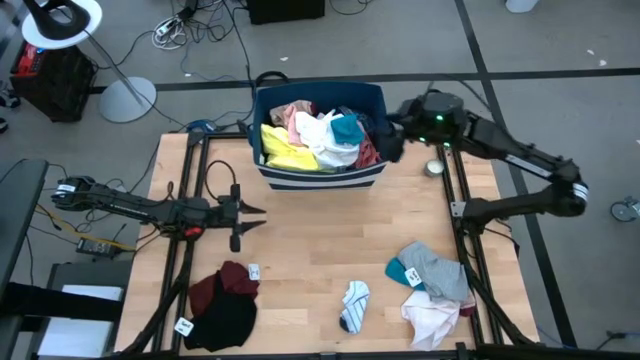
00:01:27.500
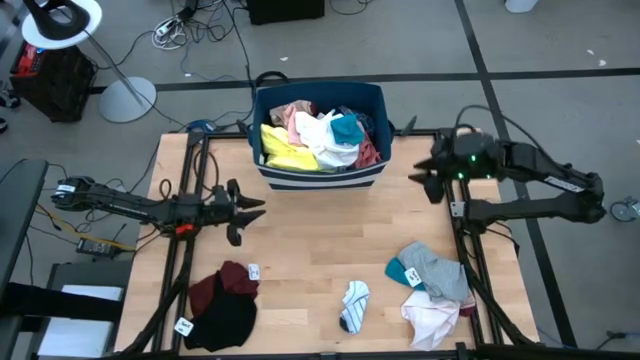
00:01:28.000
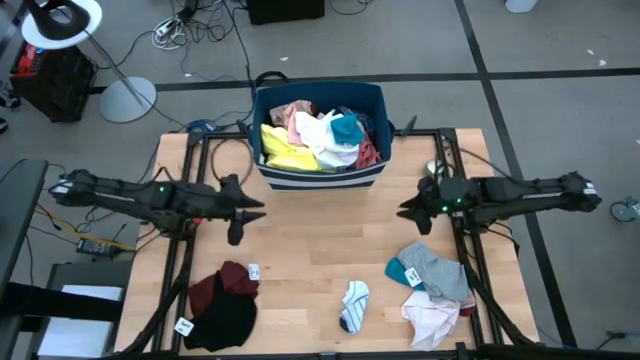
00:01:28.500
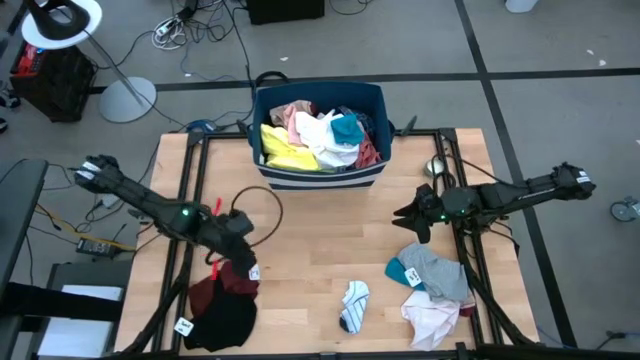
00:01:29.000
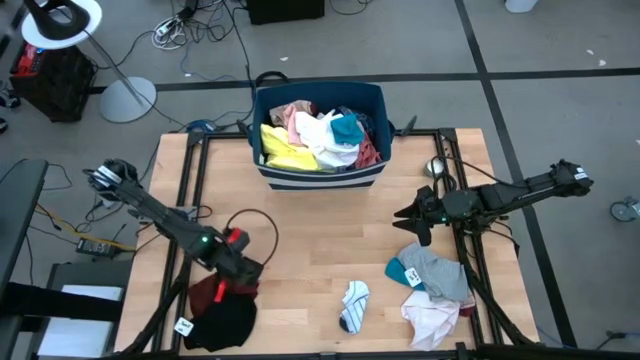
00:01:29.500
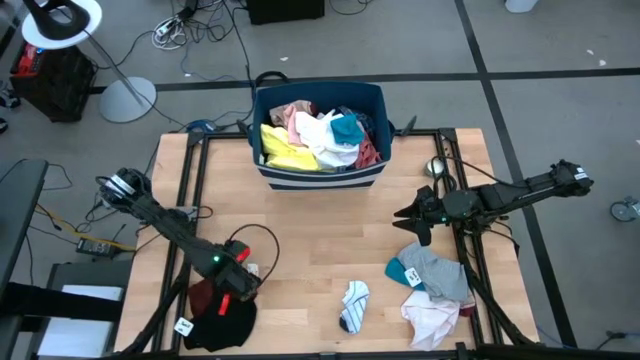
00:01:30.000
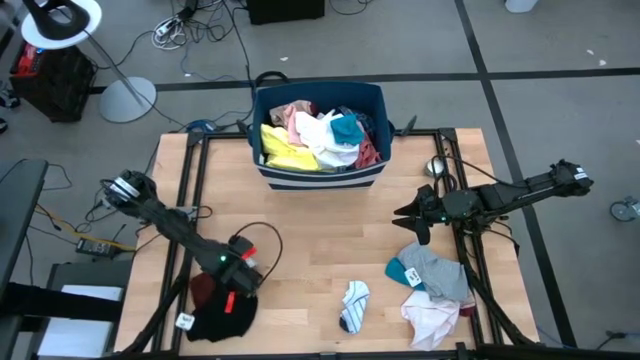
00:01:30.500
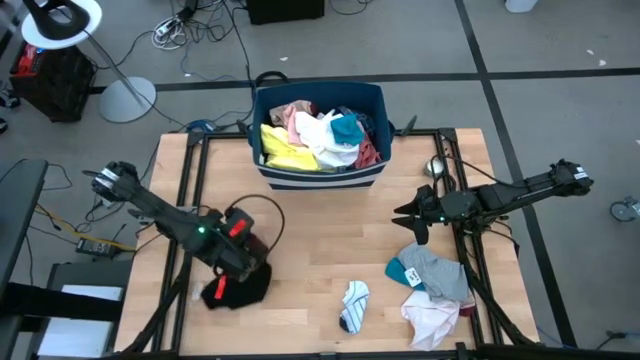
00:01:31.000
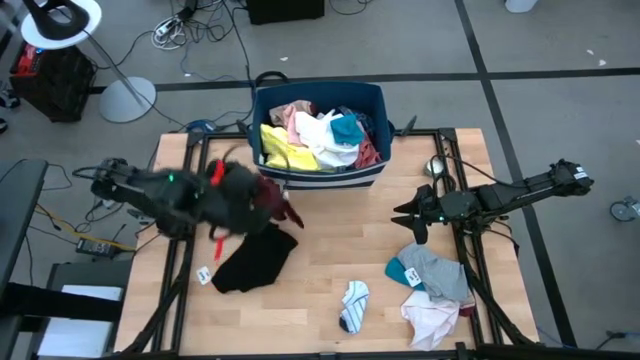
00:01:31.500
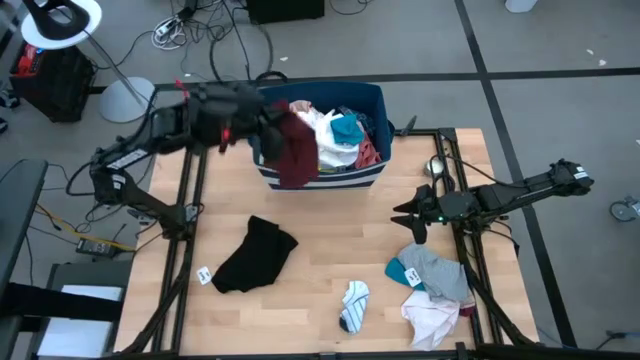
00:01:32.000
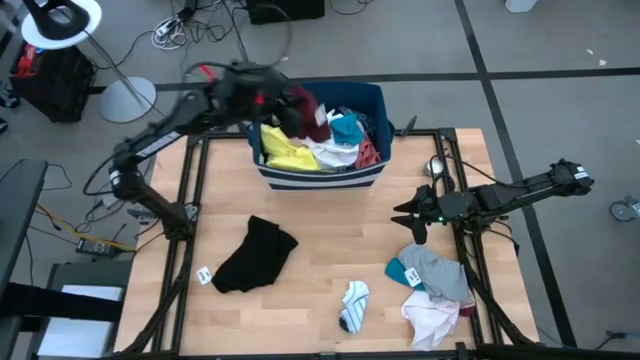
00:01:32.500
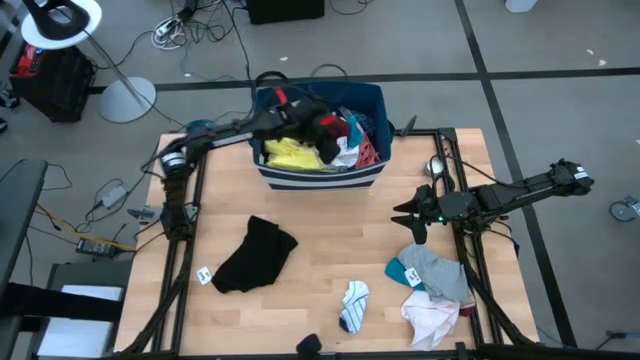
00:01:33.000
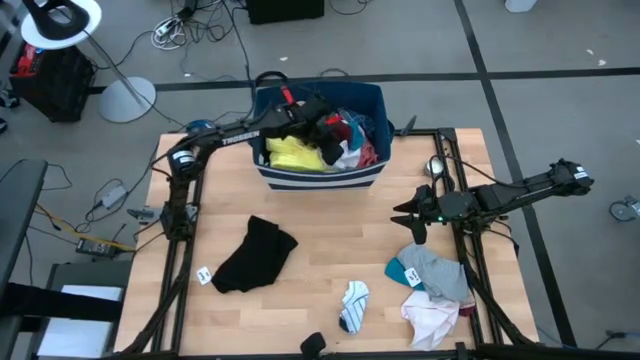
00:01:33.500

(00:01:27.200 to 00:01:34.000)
Task: Sort clothes
Put the red underwear into the blue laundry bin

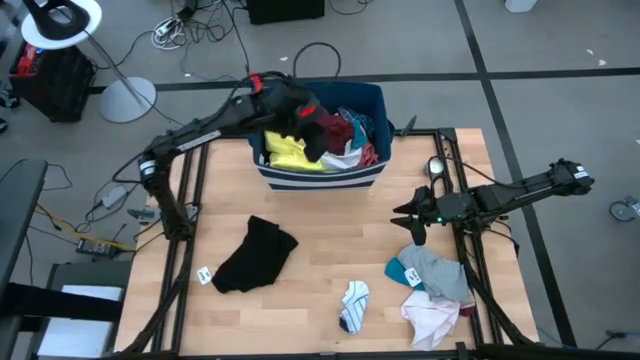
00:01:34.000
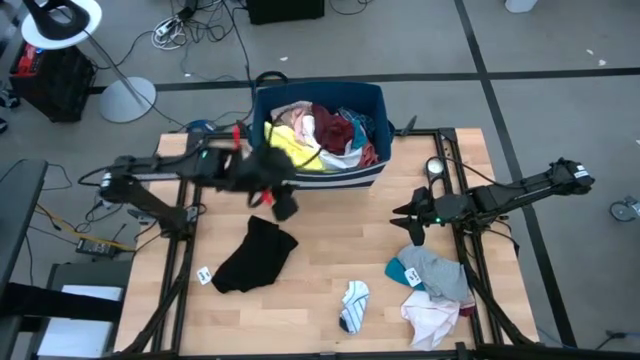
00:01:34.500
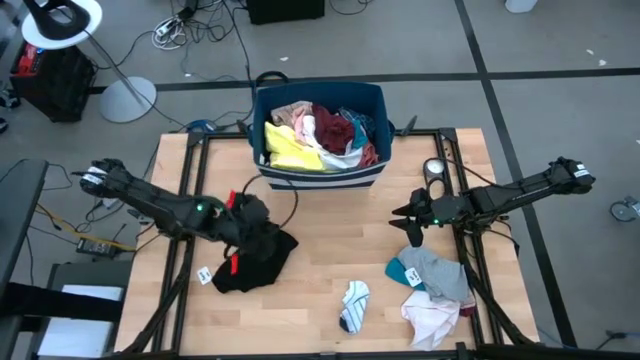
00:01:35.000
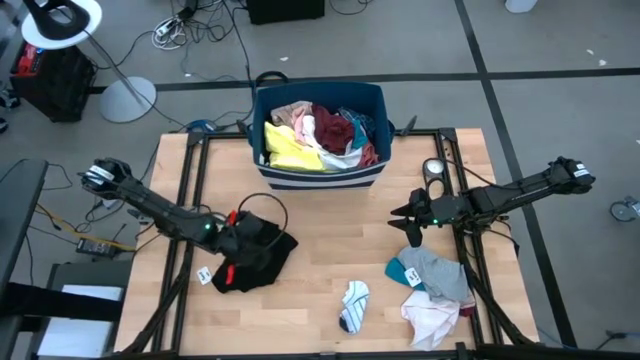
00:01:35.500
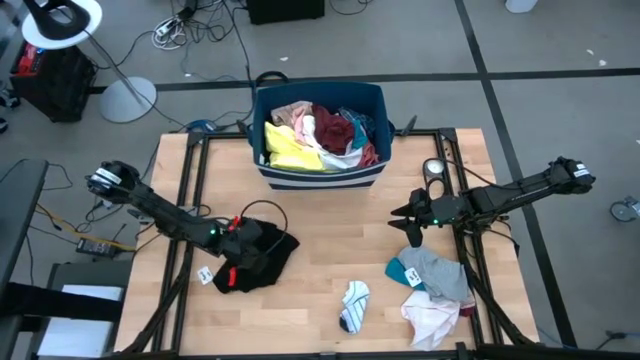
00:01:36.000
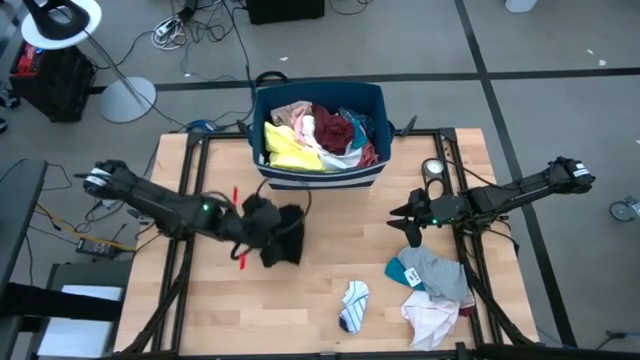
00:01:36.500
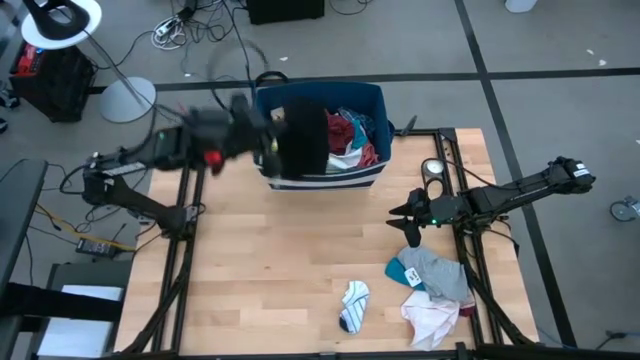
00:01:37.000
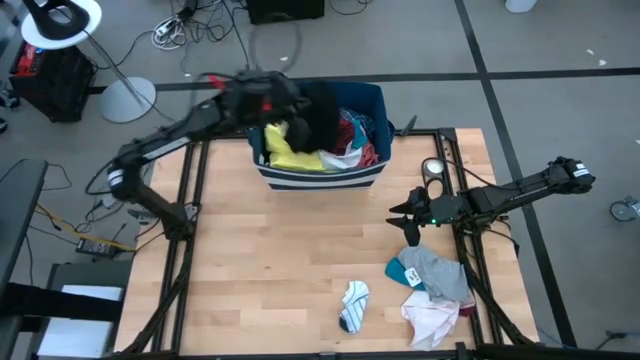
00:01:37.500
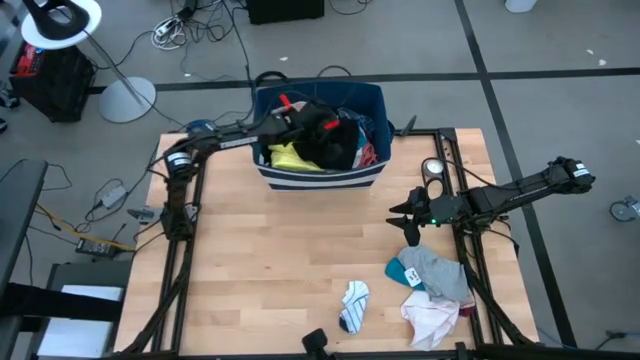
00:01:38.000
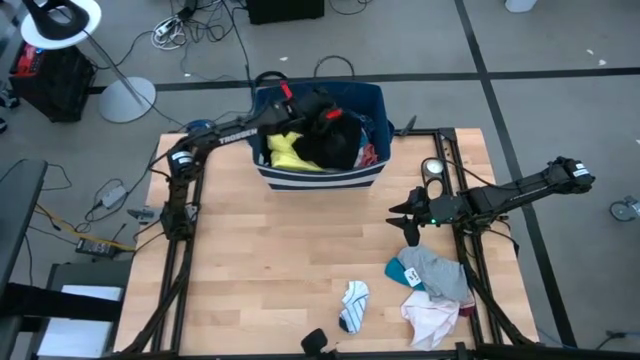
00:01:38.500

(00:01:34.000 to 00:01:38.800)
Put the black underwear into the blue laundry bin

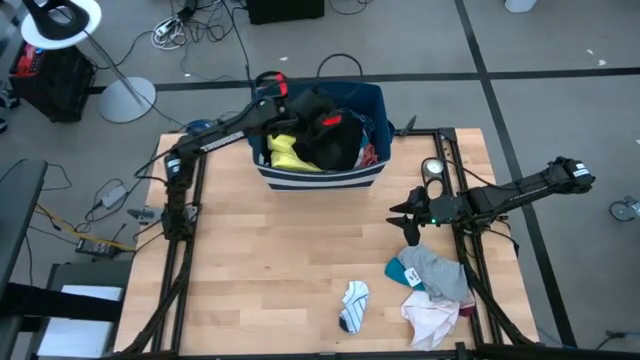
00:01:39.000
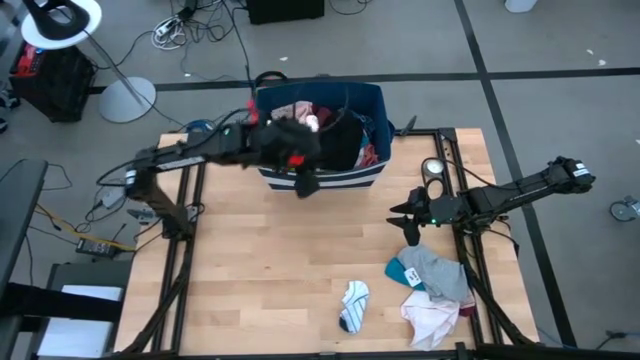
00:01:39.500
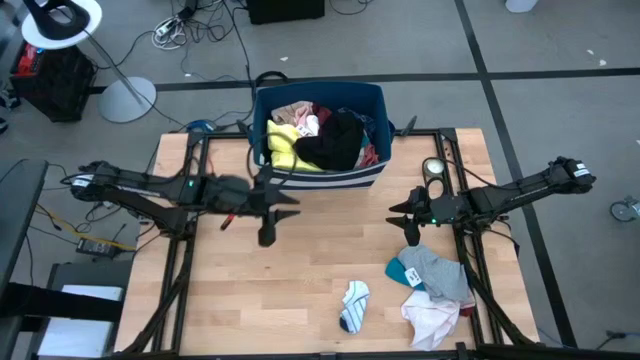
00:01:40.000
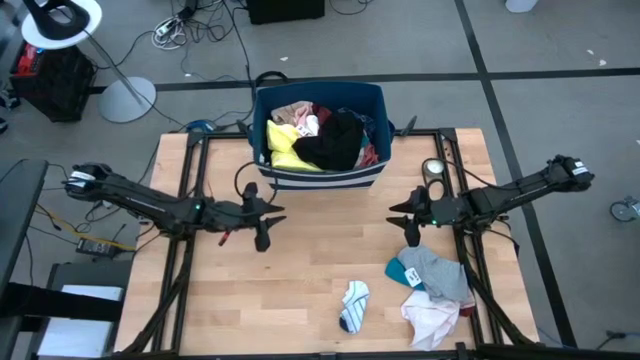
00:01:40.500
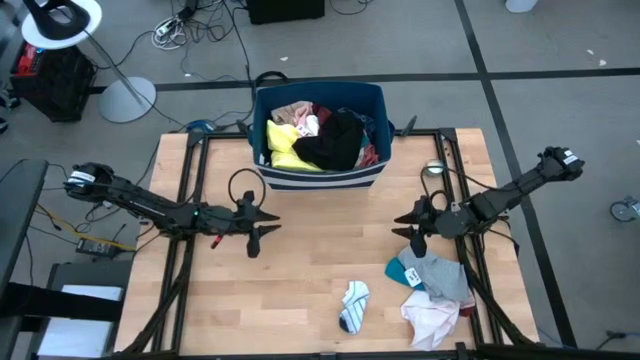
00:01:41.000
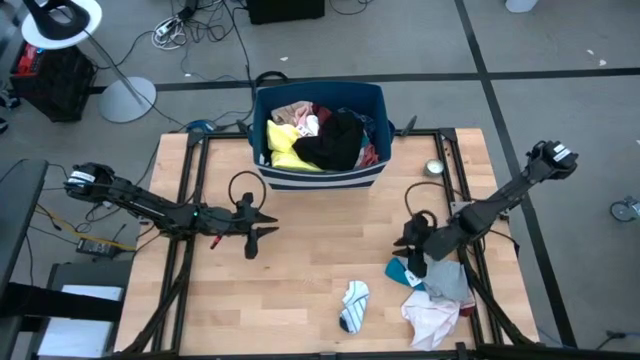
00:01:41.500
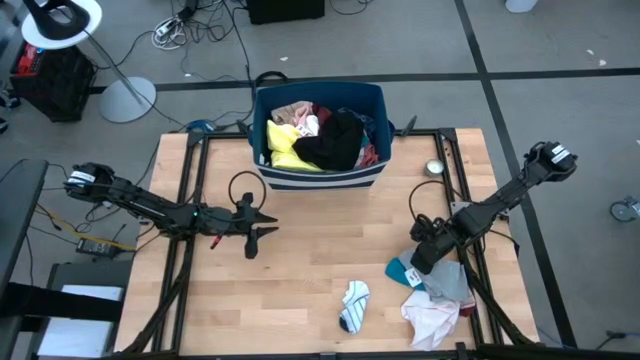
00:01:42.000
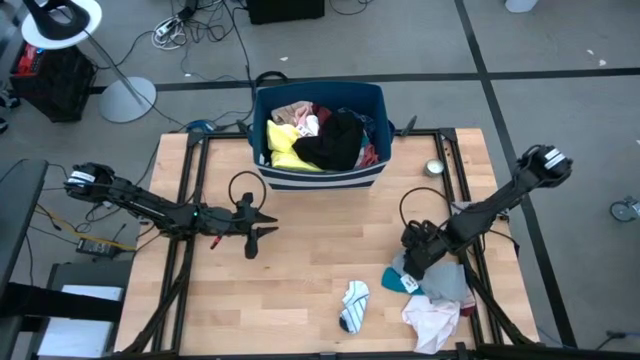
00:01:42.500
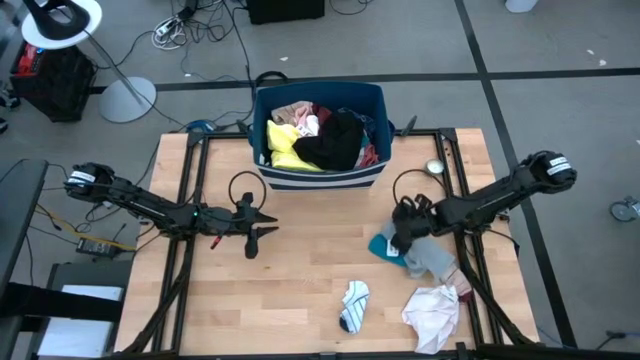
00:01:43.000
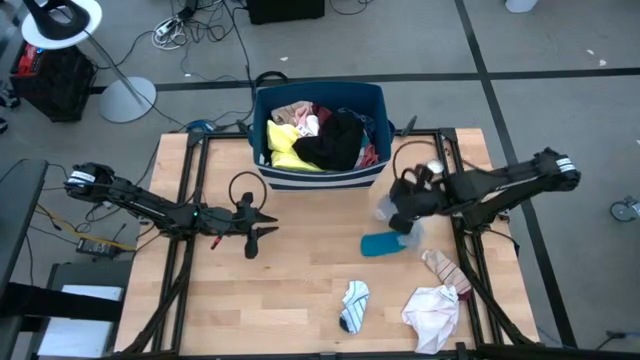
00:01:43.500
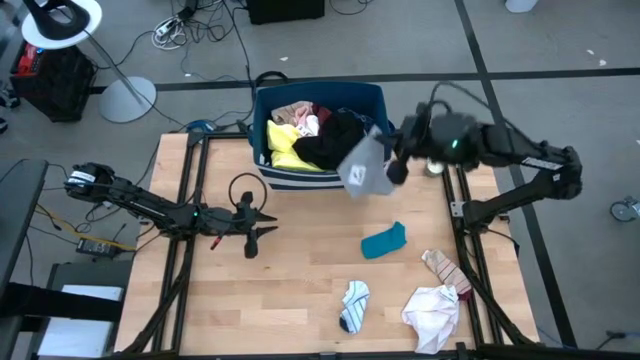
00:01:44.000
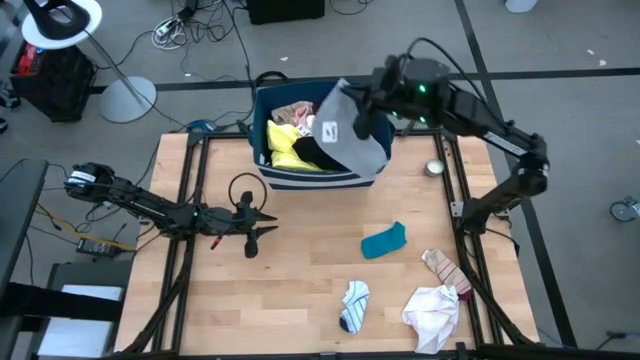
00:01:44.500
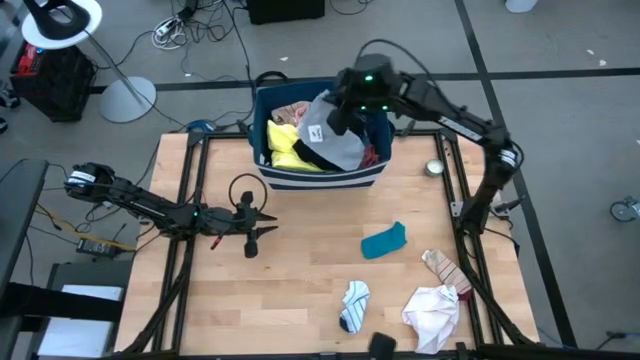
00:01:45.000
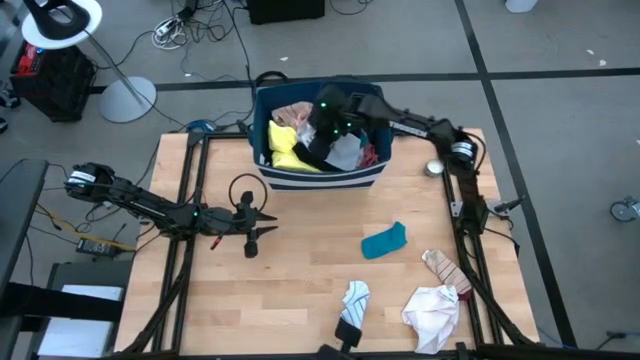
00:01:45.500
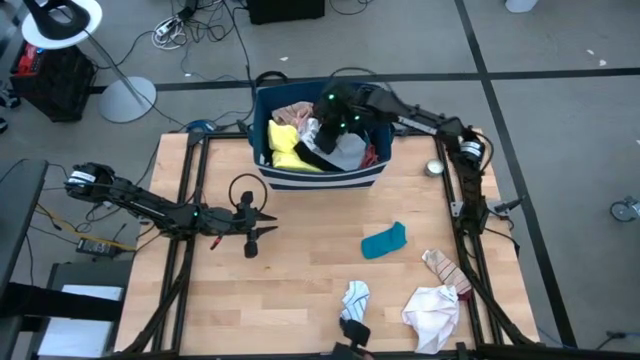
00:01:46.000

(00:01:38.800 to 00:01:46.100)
Put the gray underwear into the blue laundry bin

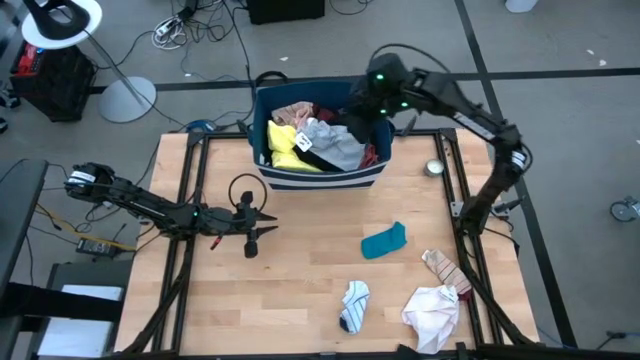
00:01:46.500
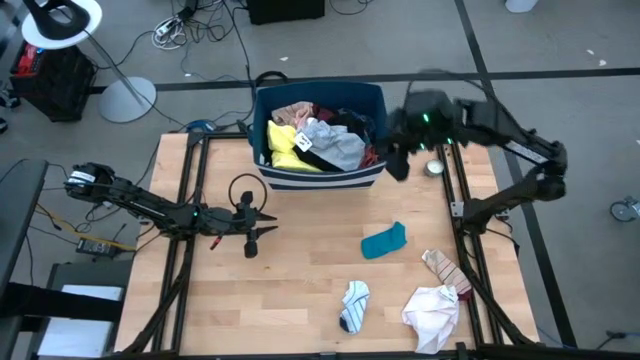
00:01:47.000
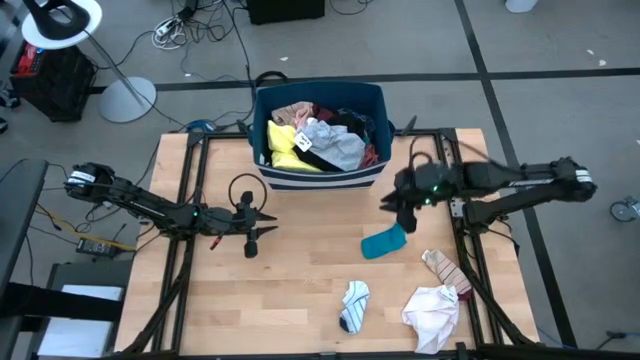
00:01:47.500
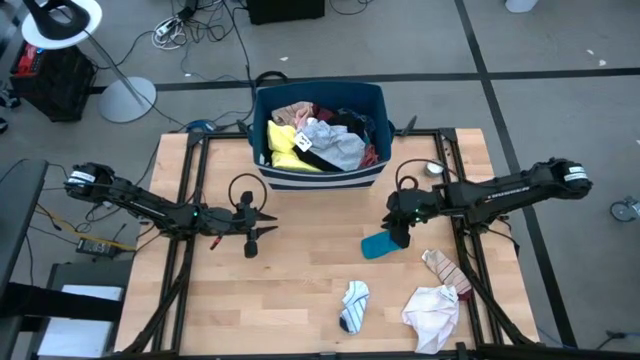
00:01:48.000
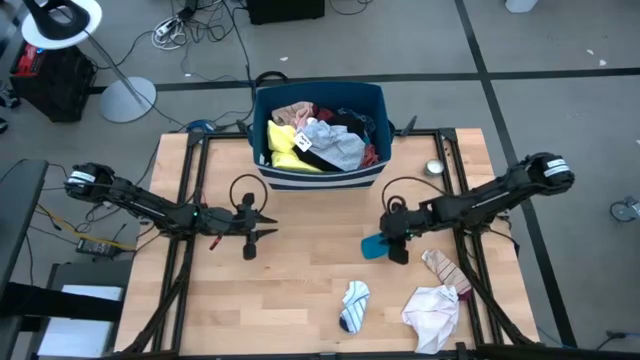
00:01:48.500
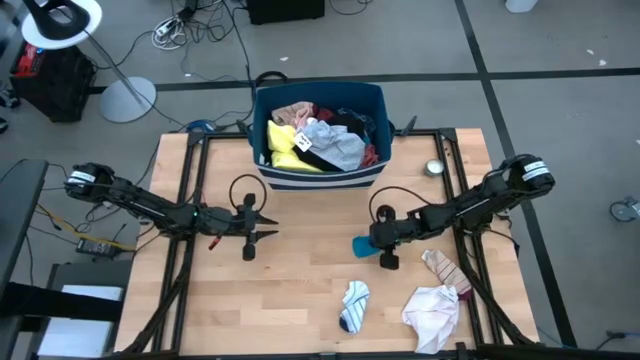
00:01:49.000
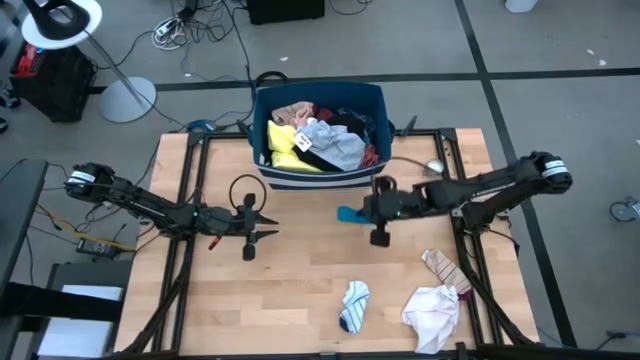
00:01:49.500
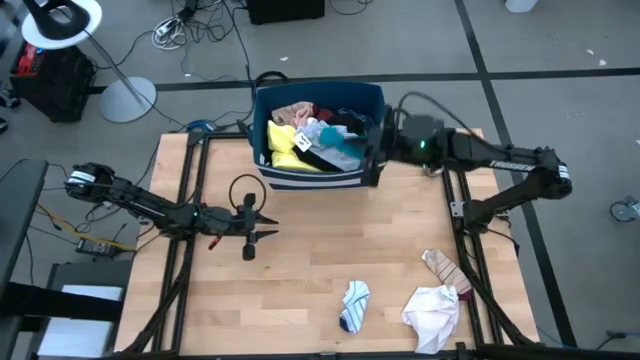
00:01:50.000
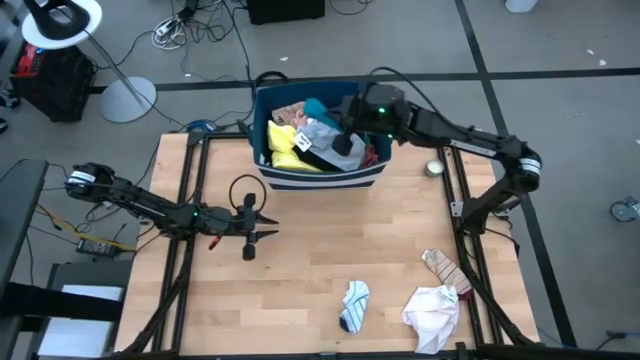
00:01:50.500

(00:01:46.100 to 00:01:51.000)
Put the blue sock into the blue laundry bin
